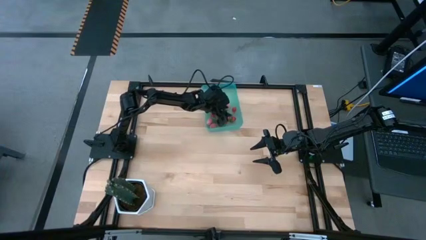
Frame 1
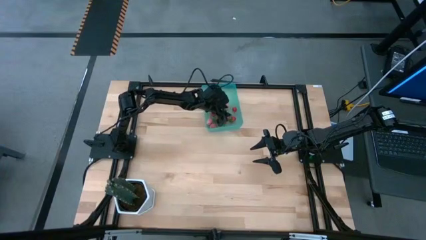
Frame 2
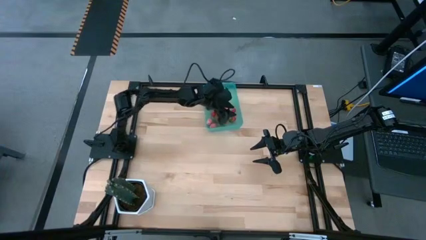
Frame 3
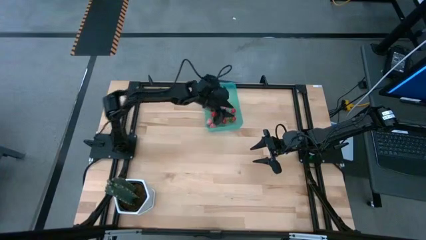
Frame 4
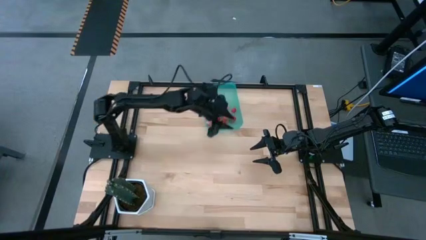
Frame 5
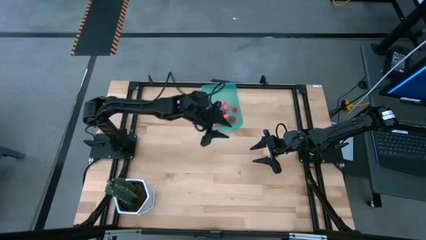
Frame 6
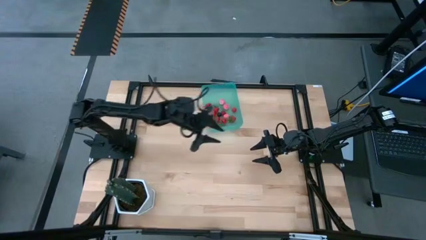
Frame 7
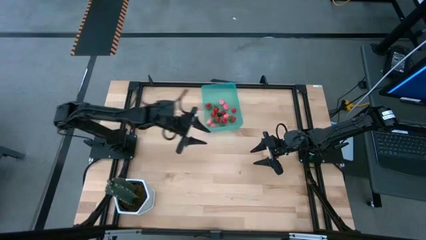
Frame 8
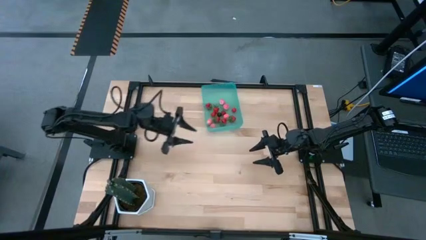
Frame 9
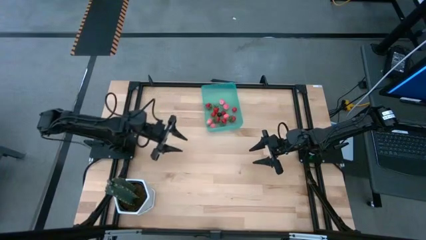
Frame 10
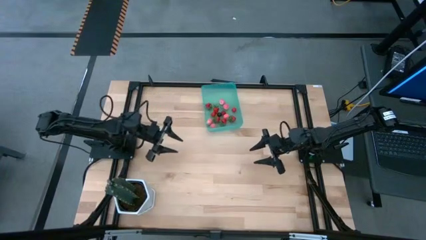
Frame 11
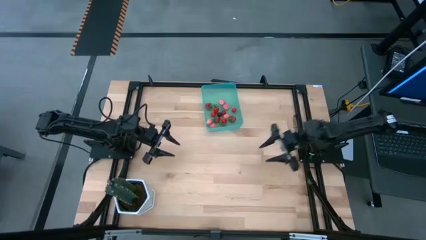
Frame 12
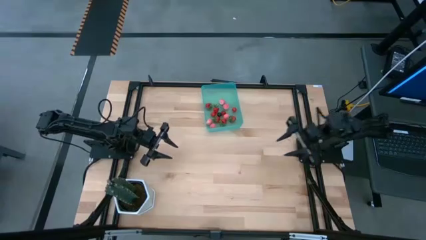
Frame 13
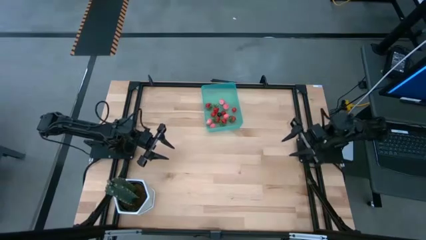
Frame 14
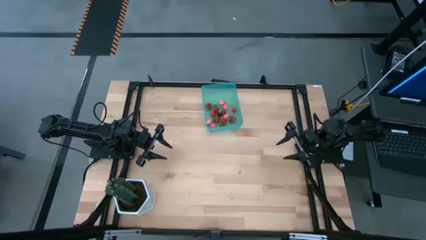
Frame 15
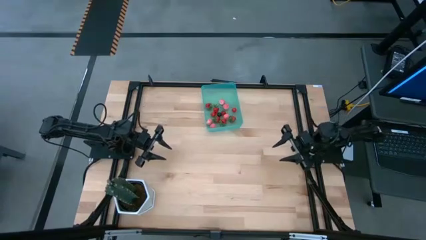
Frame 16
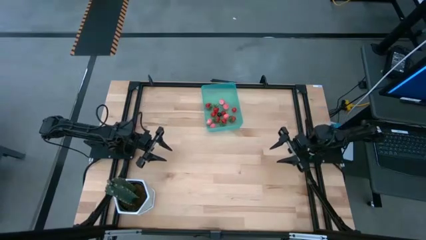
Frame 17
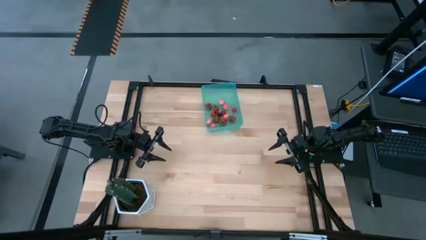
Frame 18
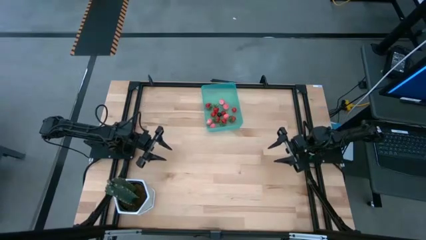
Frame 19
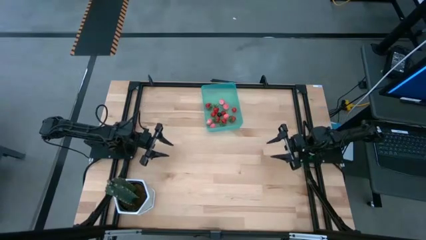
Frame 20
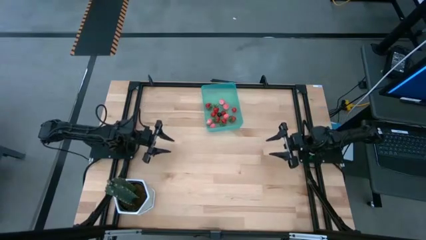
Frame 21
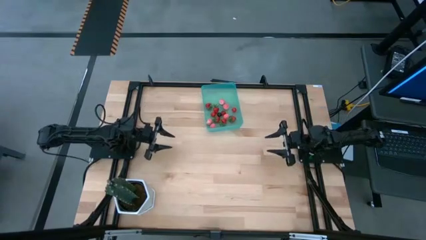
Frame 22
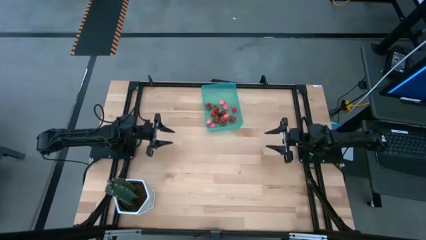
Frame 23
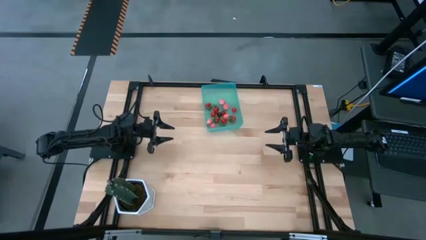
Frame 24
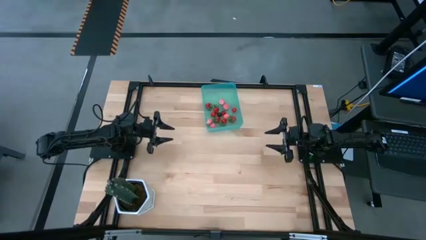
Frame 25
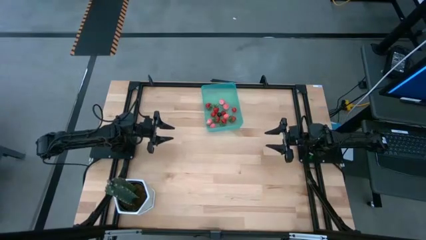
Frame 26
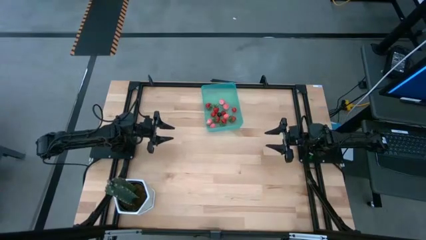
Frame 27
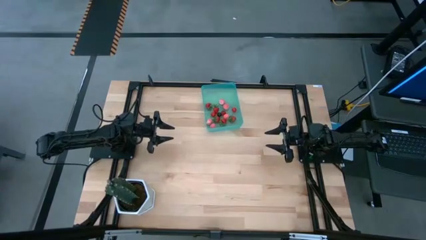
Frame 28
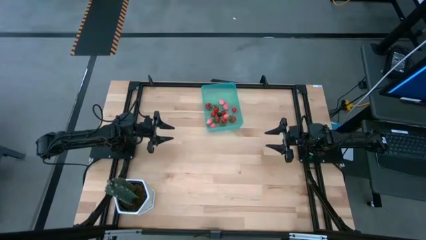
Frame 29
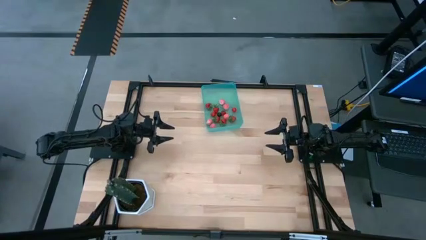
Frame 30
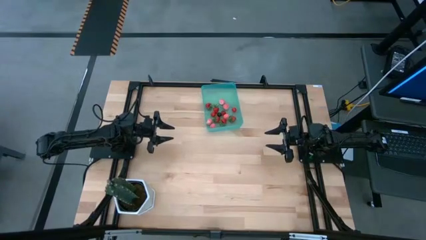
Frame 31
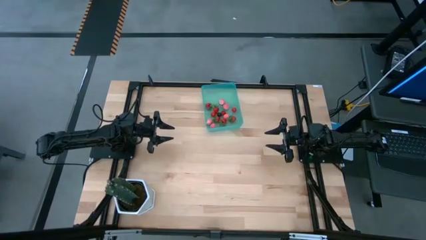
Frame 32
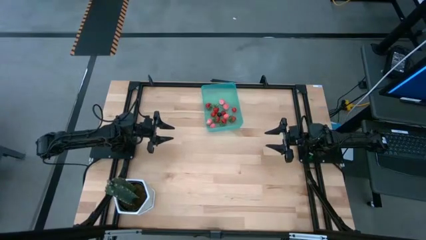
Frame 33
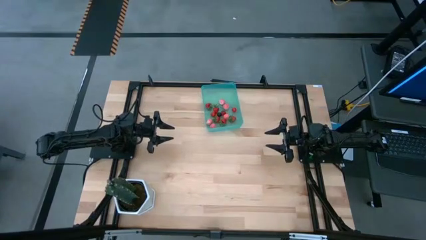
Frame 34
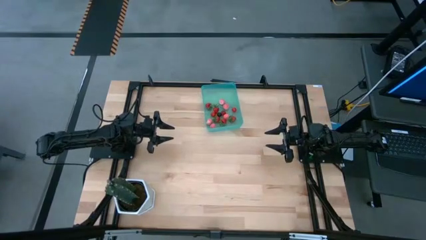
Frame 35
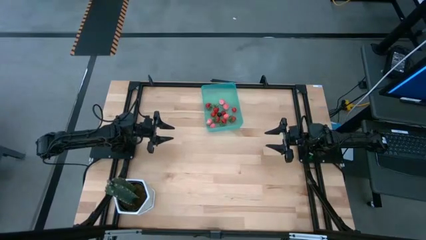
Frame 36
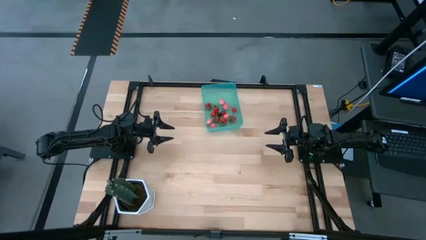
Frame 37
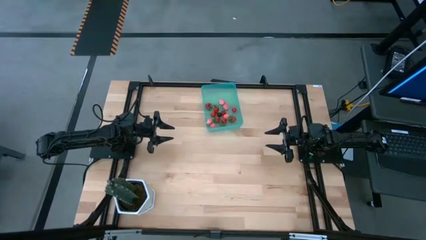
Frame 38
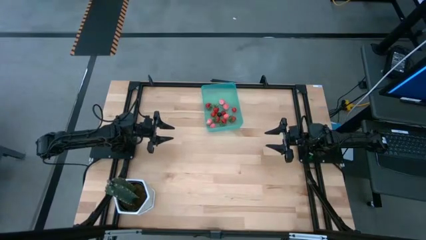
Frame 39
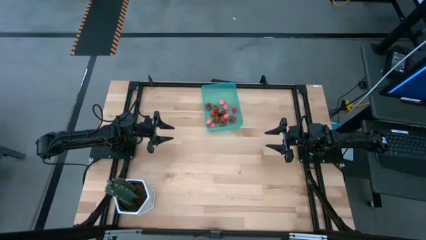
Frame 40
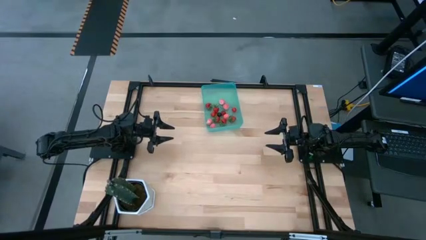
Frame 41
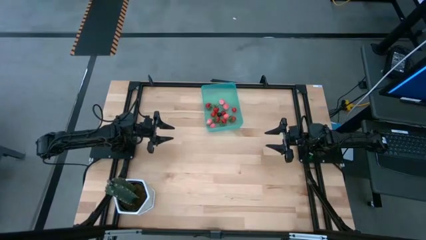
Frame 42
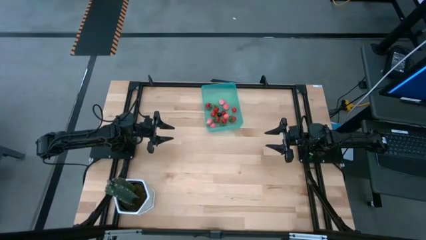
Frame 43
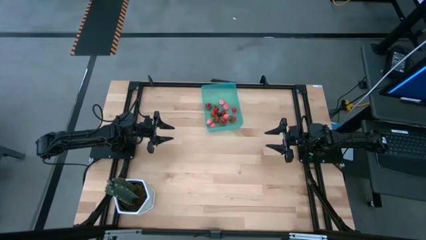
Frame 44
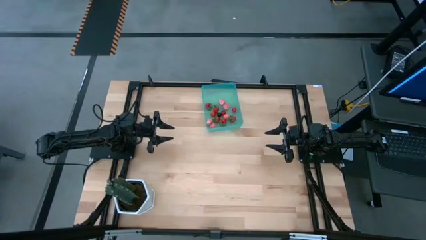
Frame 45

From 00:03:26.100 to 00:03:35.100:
Task: Pick and placing Produce into tupperware
Return to Home Position

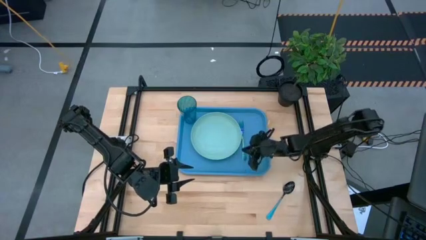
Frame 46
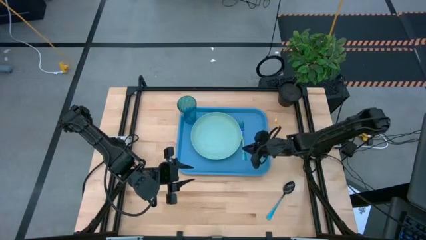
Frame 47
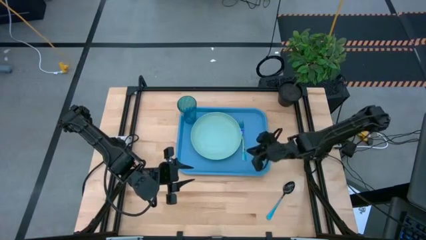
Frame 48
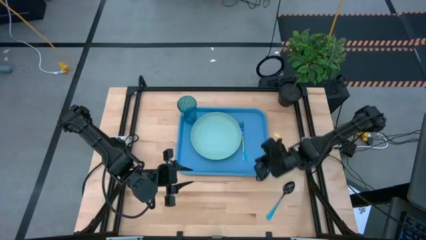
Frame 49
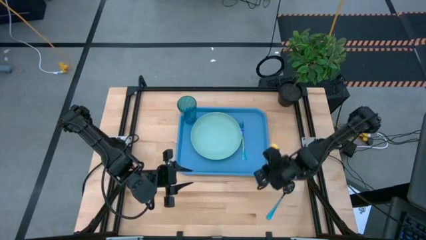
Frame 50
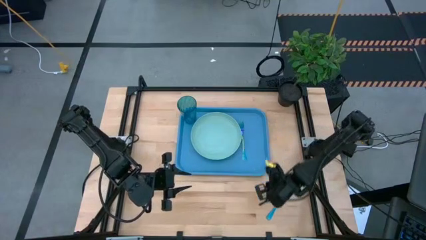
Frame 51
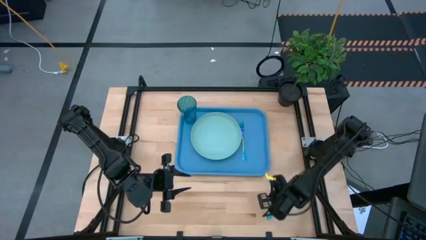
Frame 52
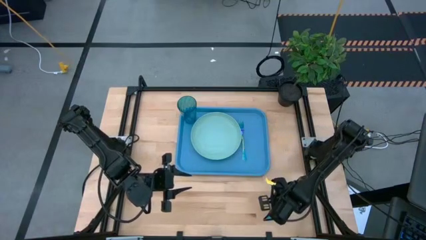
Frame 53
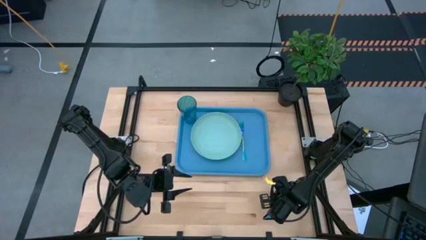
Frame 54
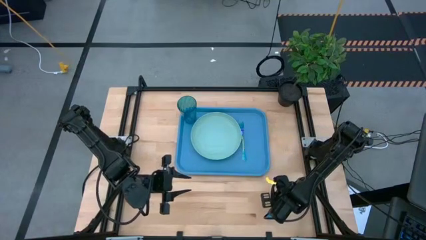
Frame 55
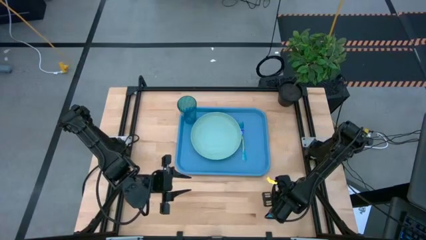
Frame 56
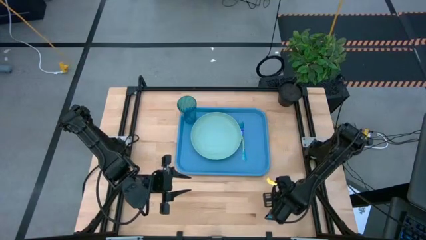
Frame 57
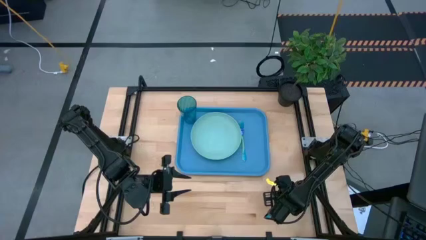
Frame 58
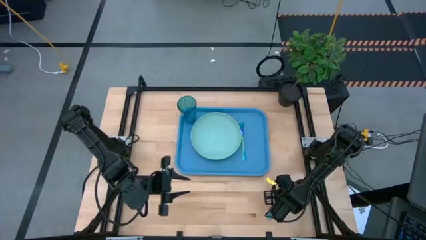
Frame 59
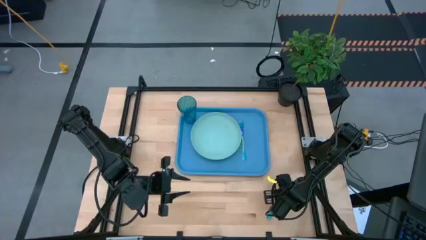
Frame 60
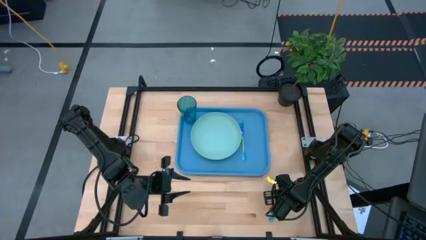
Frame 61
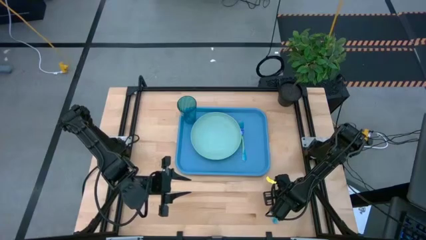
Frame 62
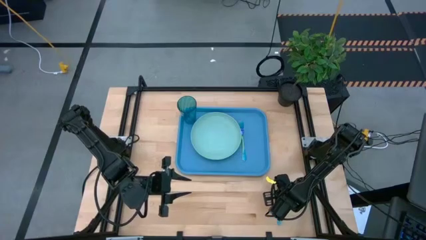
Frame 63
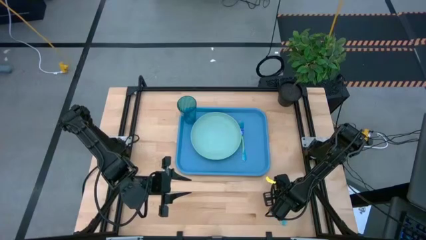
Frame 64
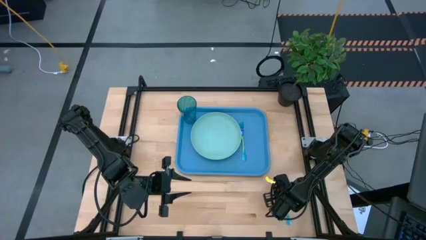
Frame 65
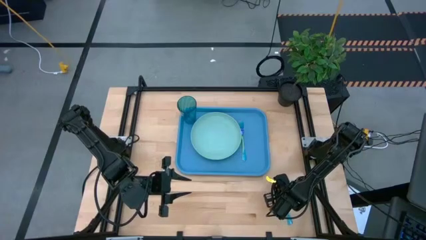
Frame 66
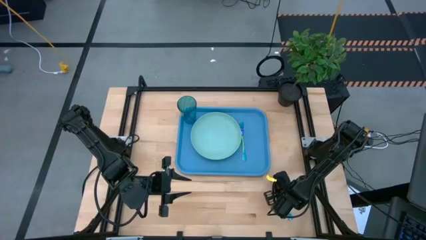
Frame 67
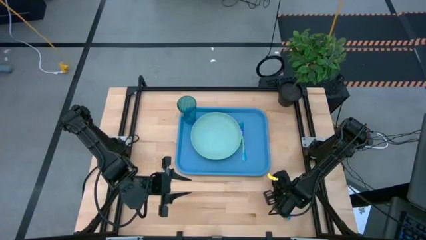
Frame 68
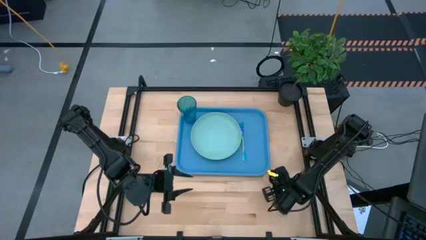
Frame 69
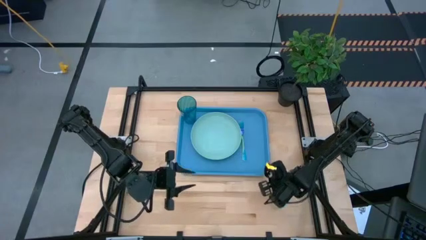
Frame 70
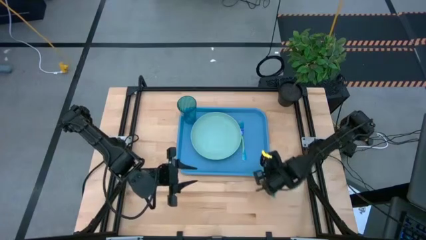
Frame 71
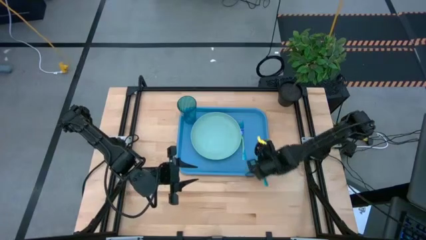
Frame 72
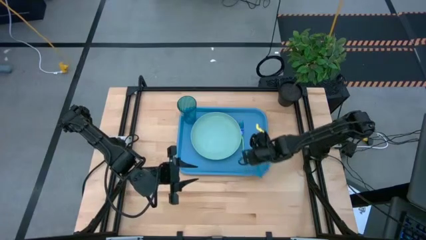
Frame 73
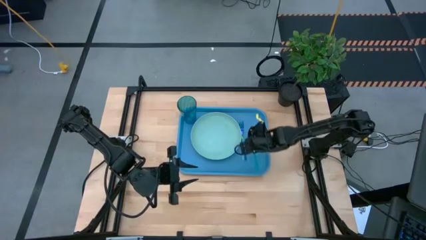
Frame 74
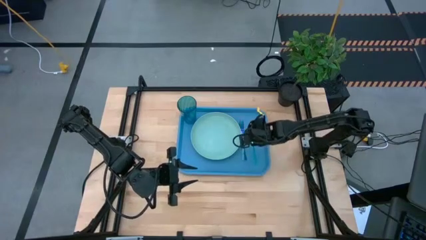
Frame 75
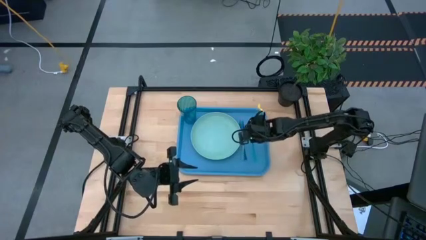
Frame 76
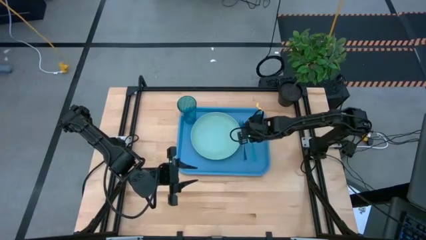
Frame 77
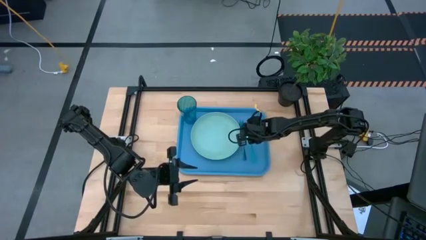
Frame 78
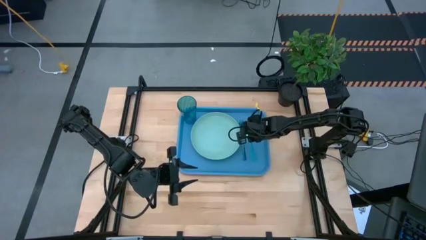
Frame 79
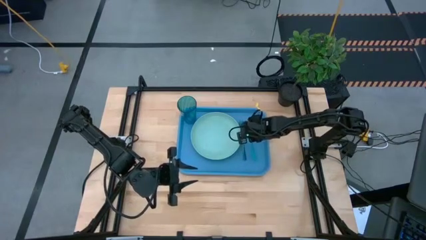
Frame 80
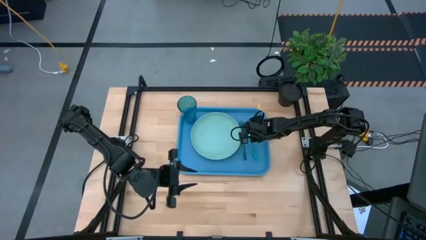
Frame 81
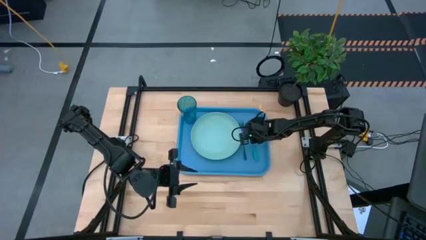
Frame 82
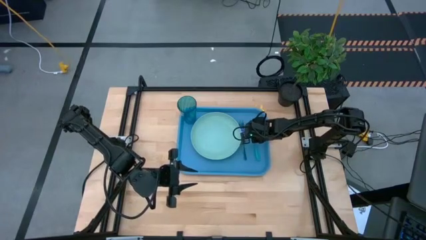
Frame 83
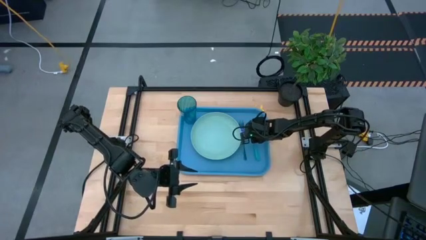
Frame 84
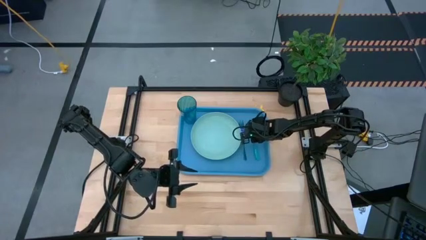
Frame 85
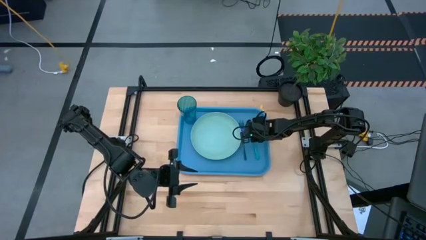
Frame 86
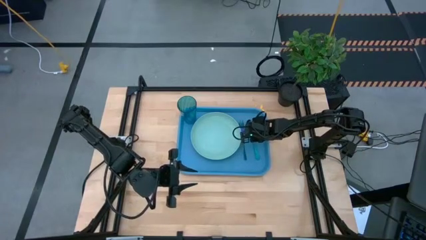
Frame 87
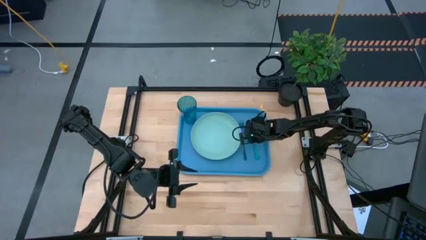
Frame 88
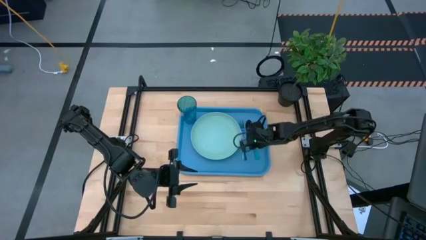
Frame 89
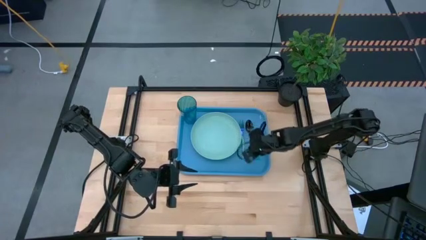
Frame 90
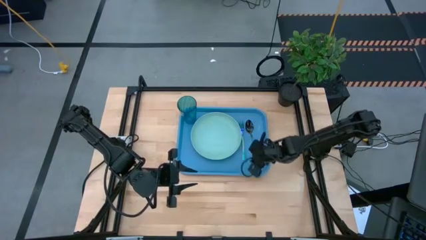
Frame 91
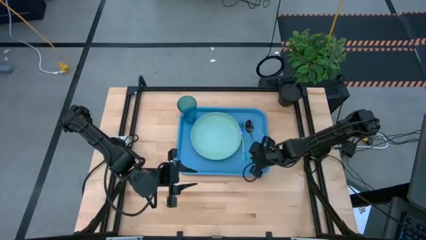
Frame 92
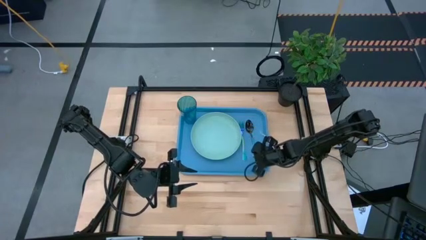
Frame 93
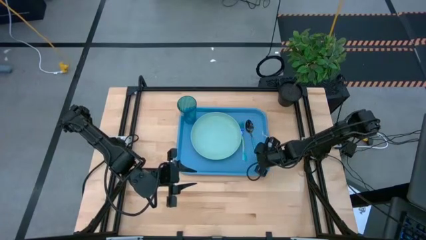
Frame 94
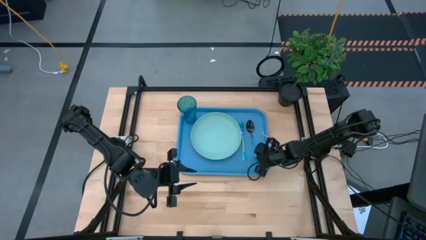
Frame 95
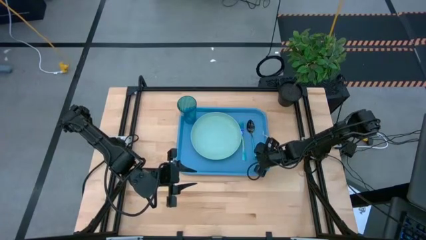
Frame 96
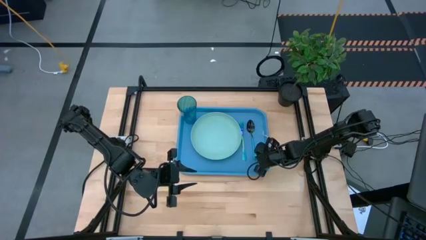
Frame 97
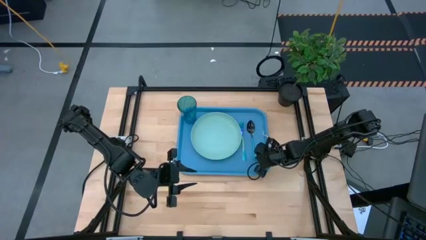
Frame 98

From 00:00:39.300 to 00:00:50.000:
Task: Pick and place plate/cup/fork/spoon on tray
Put the blue spoon on the blue serving tray
